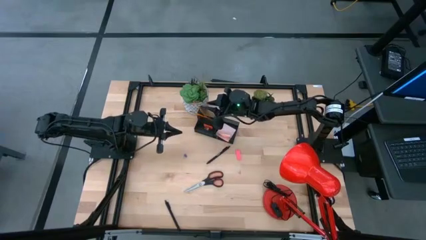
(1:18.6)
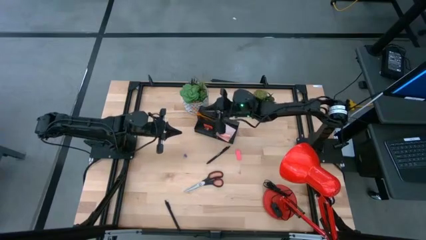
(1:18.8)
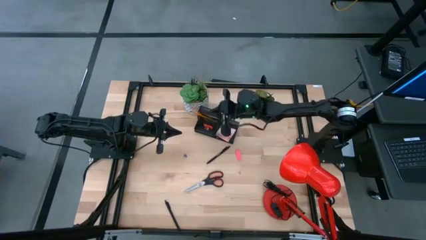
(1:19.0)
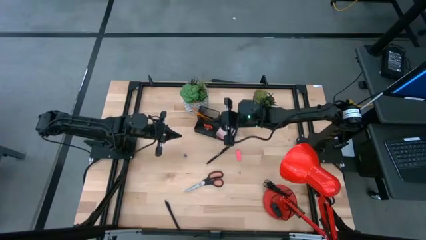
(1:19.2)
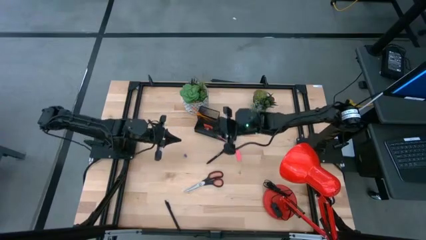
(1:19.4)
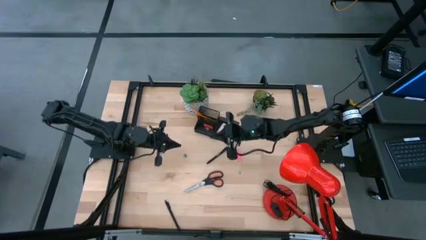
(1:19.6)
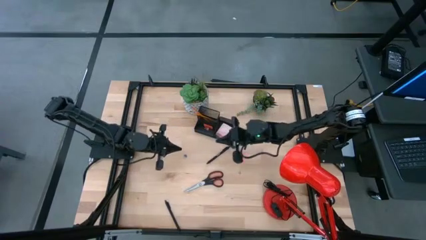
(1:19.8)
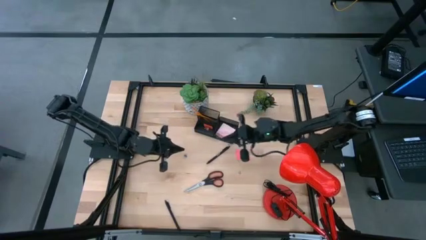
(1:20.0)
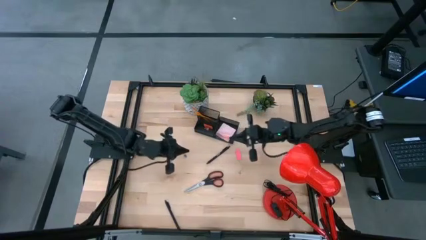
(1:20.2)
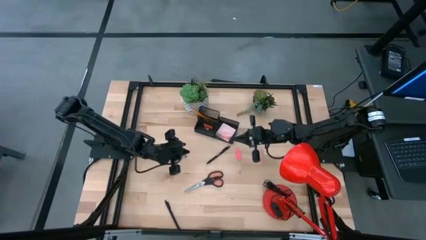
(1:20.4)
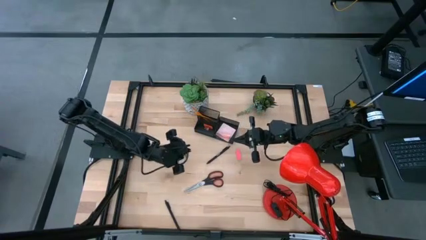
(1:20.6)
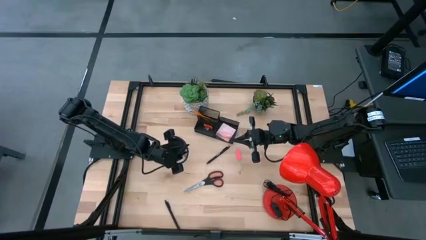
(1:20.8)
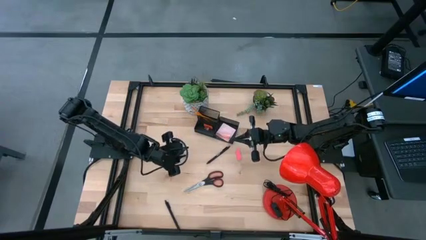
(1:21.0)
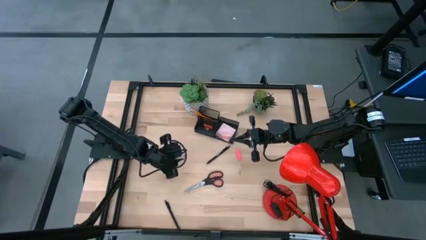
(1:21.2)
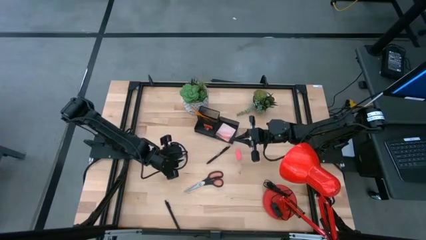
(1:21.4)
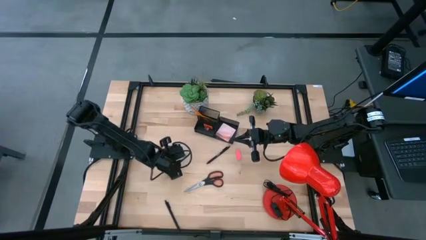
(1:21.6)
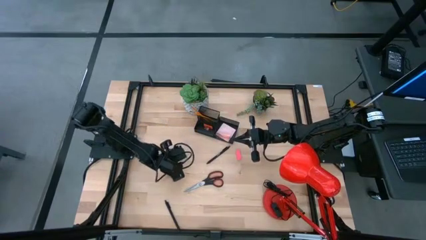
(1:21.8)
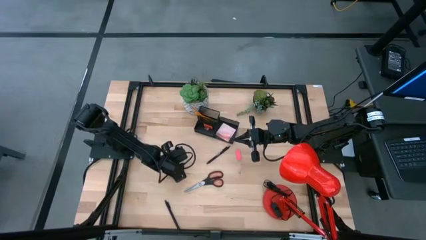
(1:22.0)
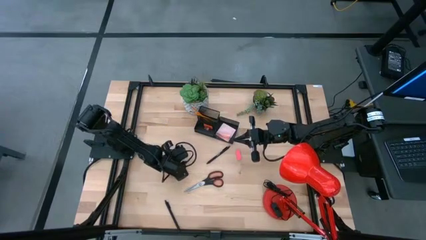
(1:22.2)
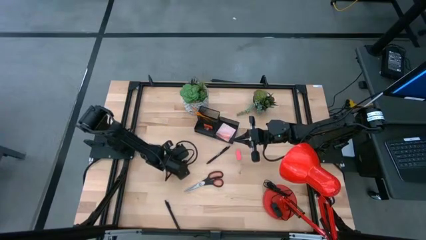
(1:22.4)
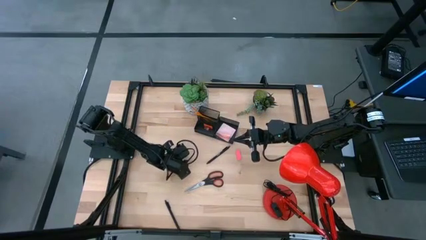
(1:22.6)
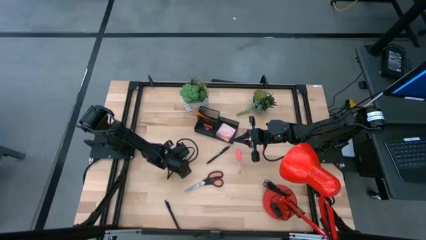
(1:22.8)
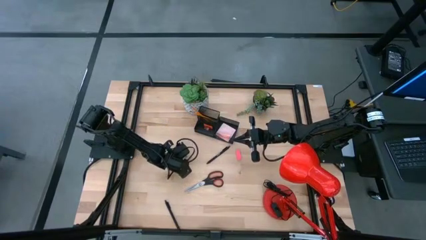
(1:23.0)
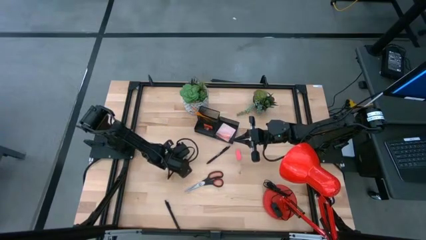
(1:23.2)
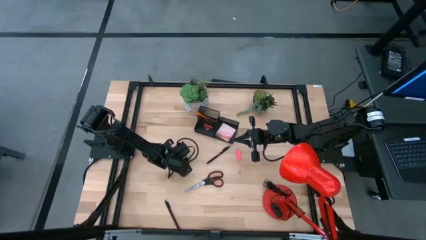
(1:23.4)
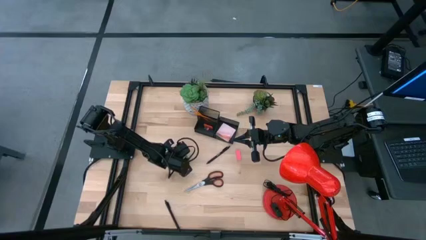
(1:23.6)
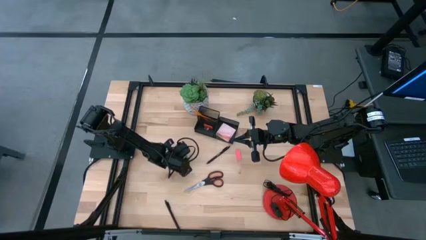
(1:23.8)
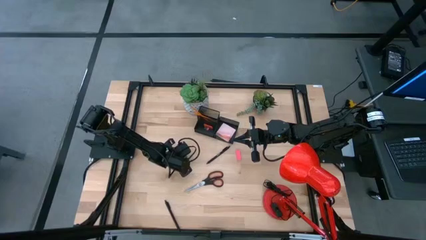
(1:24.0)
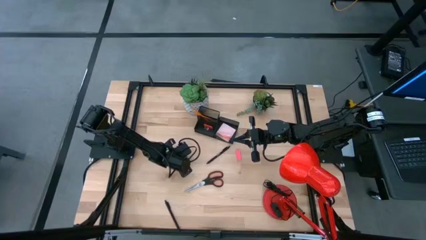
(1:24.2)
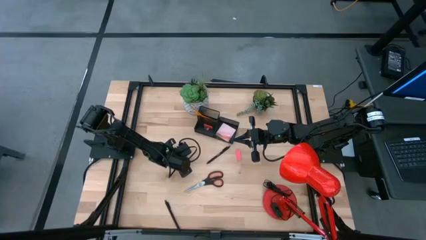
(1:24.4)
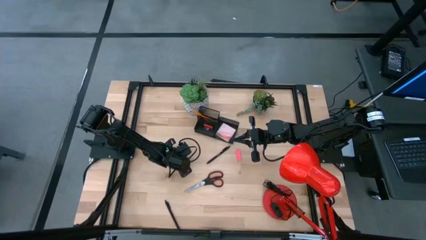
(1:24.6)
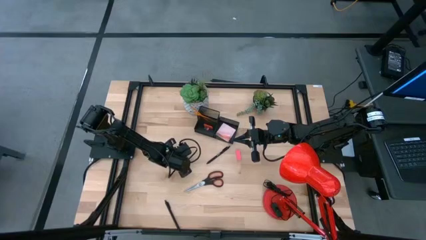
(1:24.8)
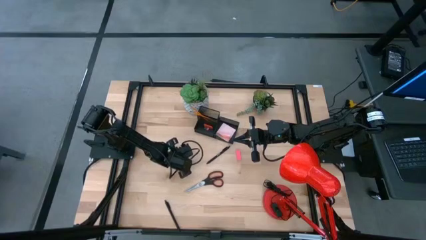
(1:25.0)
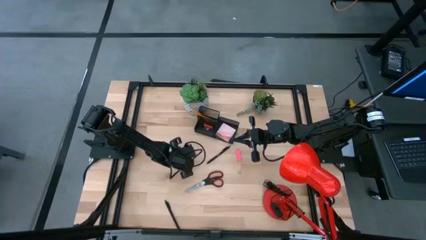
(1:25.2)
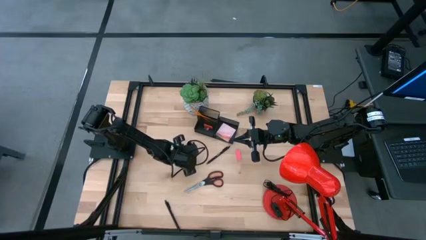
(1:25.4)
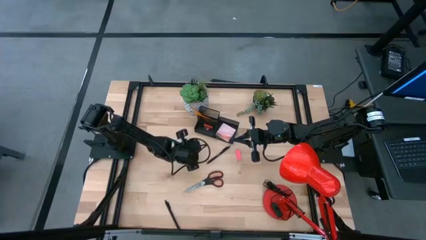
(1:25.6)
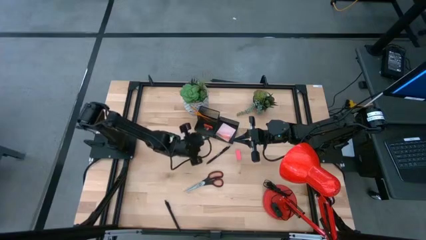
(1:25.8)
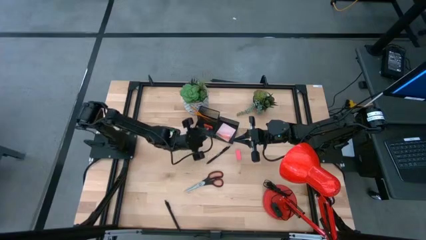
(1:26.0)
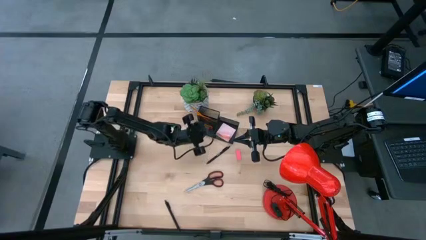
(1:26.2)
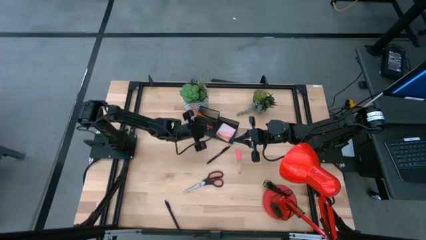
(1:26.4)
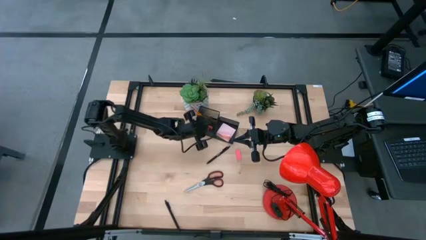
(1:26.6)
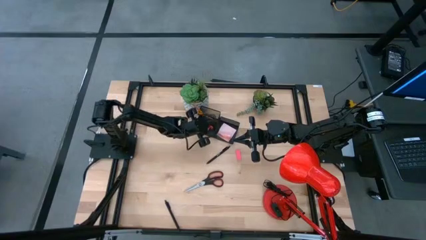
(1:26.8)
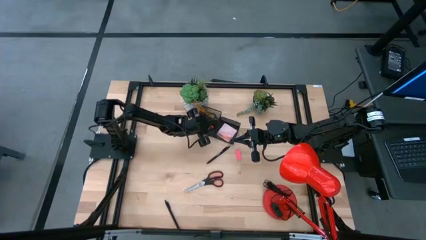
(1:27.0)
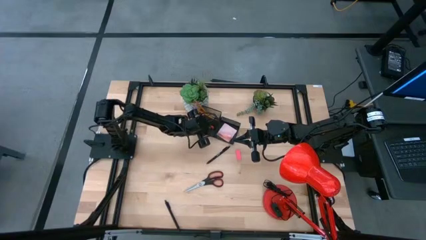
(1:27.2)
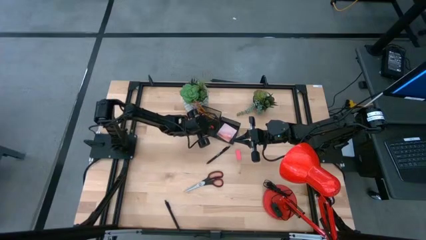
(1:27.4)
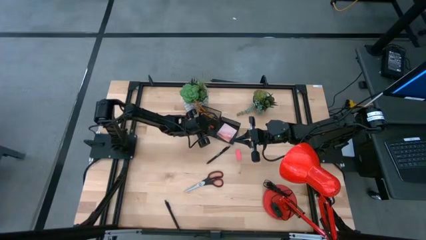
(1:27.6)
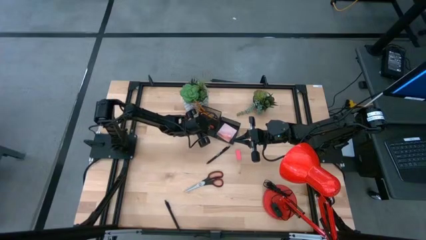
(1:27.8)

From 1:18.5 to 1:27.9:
Task: Pick and place office supplies into organizer
Put the blue binder clip into the black desk organizer

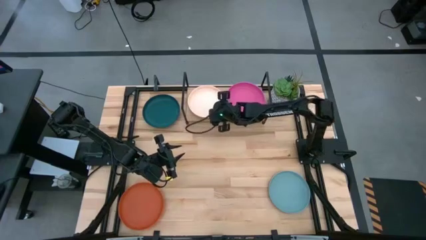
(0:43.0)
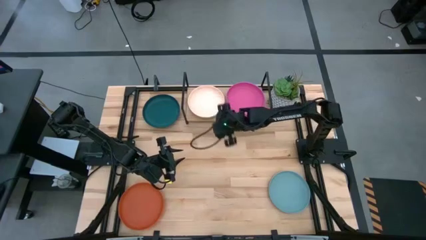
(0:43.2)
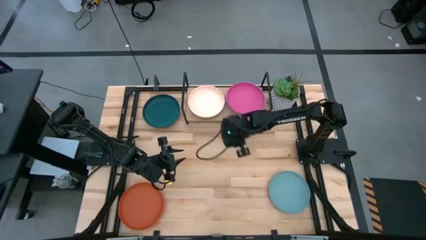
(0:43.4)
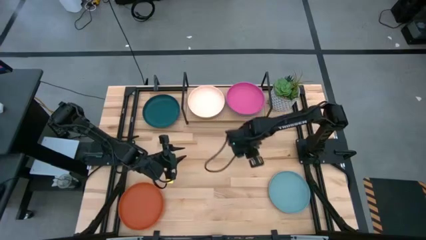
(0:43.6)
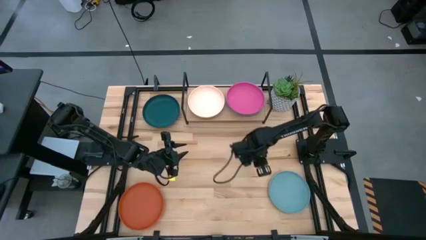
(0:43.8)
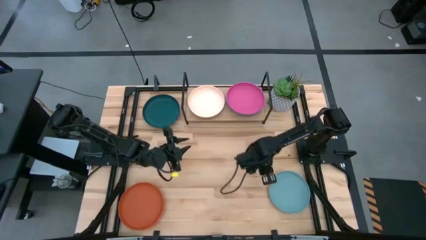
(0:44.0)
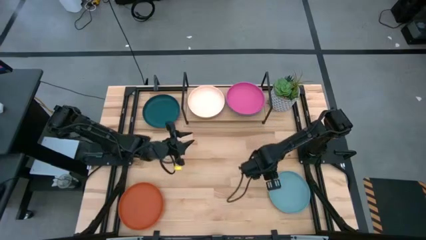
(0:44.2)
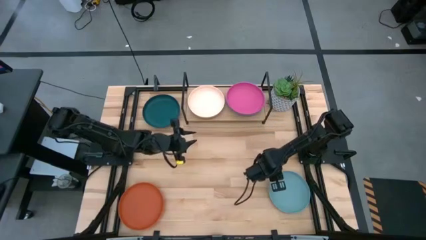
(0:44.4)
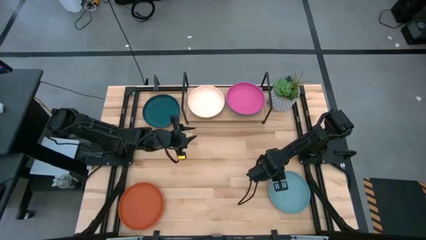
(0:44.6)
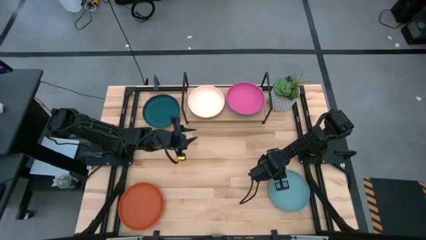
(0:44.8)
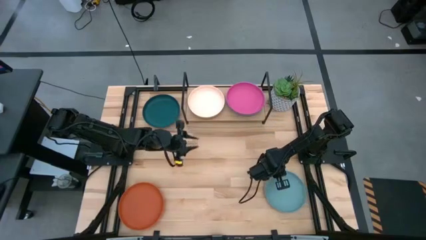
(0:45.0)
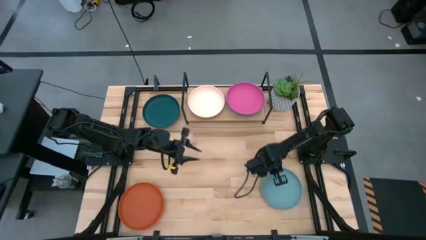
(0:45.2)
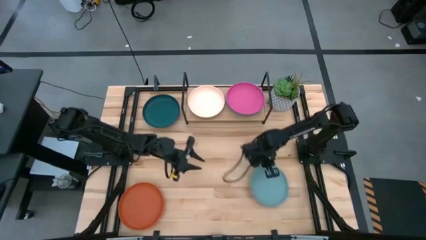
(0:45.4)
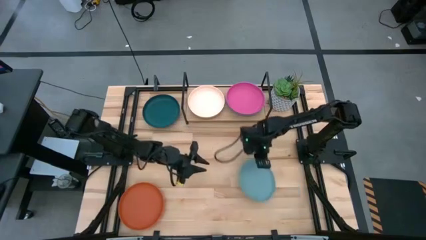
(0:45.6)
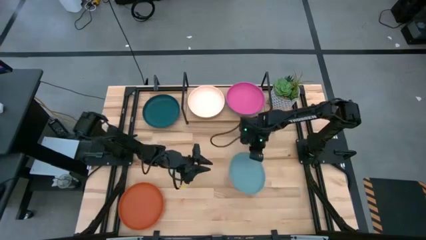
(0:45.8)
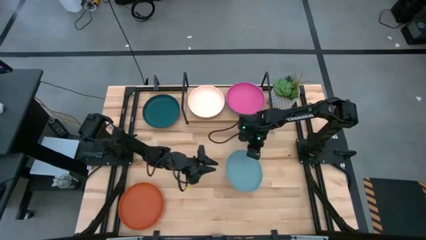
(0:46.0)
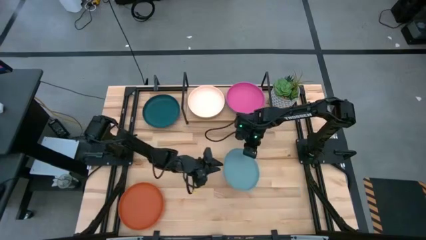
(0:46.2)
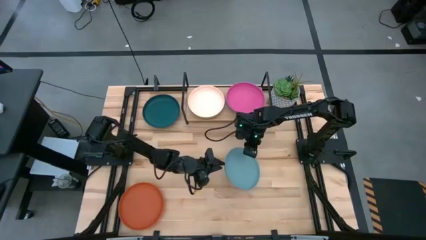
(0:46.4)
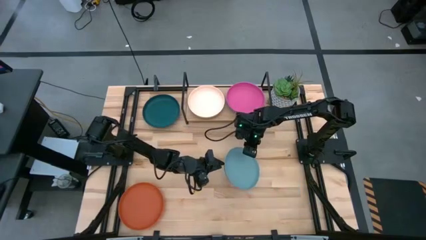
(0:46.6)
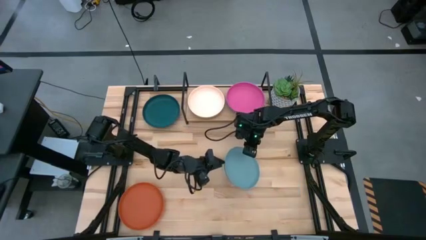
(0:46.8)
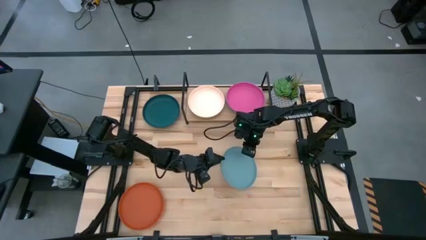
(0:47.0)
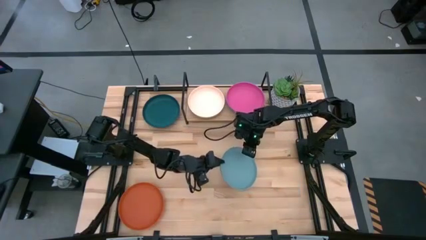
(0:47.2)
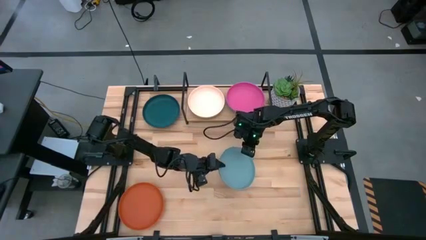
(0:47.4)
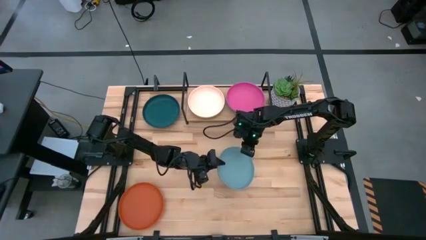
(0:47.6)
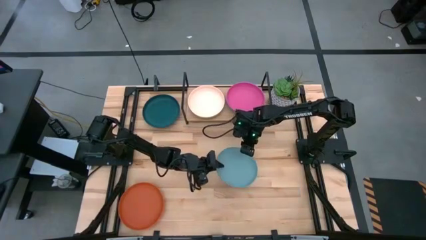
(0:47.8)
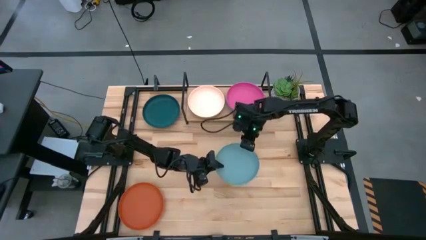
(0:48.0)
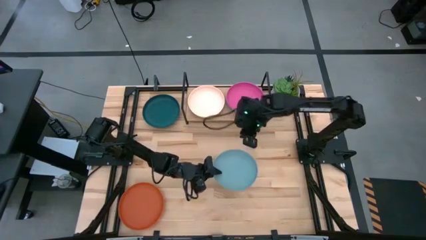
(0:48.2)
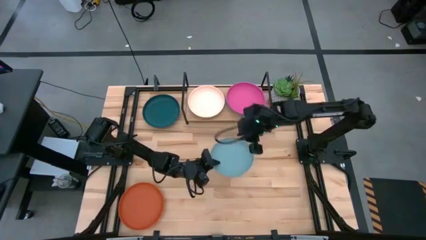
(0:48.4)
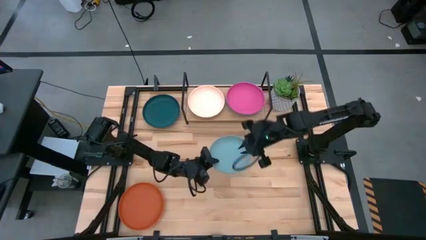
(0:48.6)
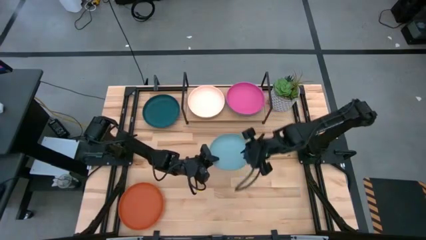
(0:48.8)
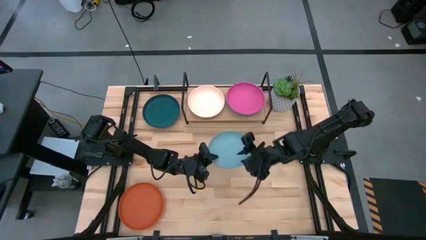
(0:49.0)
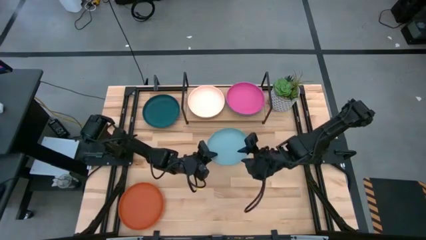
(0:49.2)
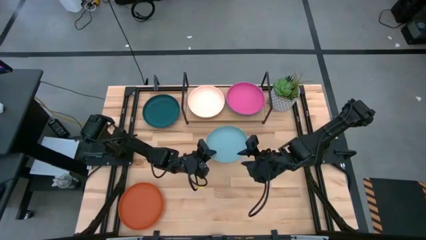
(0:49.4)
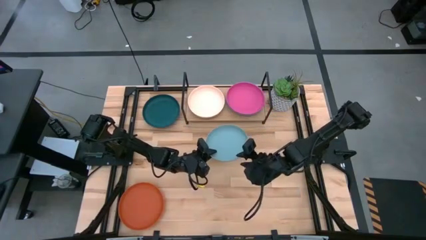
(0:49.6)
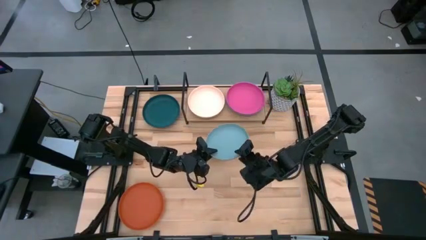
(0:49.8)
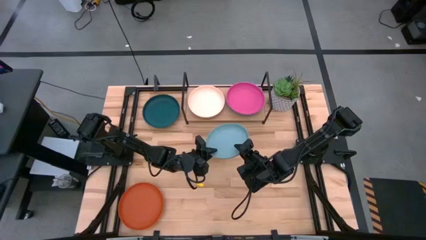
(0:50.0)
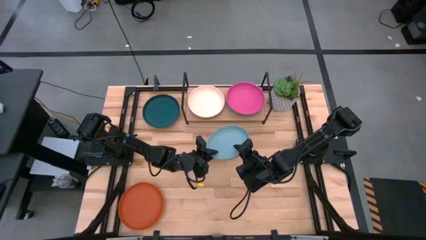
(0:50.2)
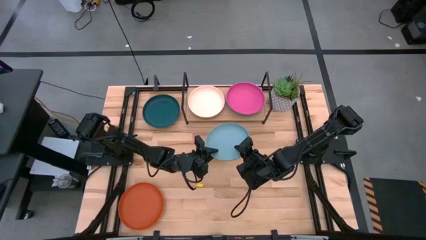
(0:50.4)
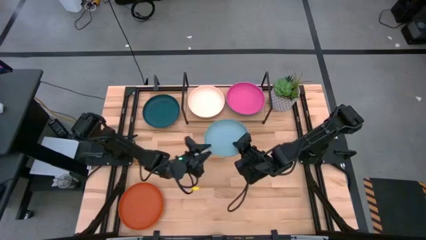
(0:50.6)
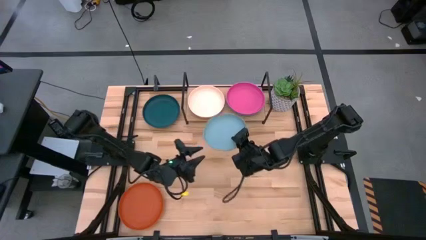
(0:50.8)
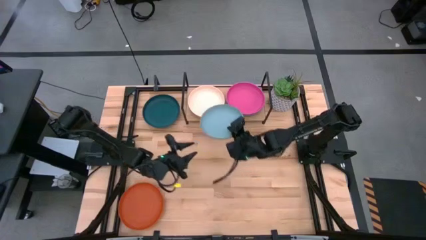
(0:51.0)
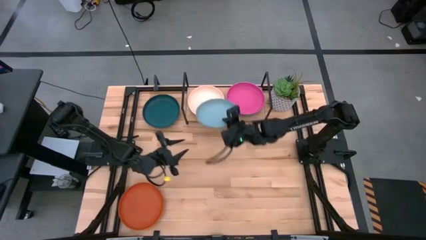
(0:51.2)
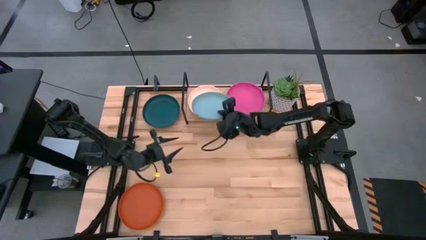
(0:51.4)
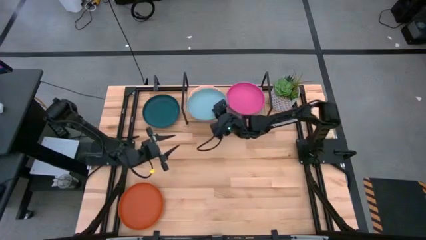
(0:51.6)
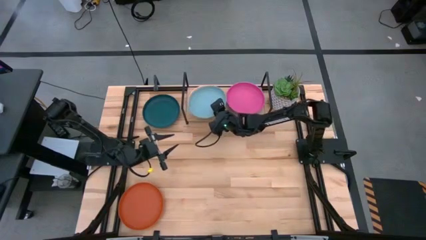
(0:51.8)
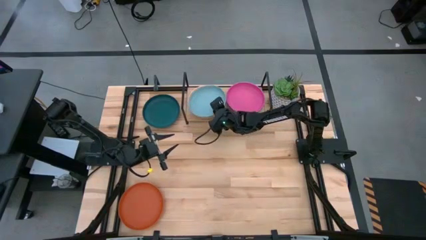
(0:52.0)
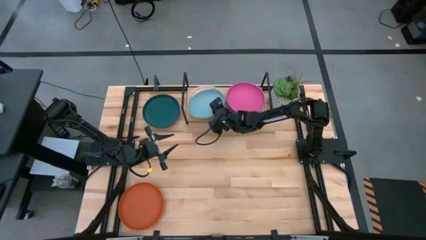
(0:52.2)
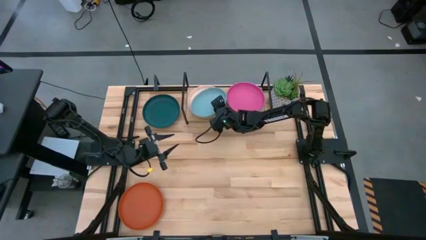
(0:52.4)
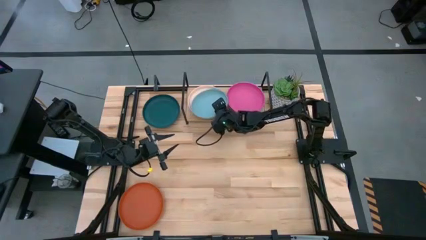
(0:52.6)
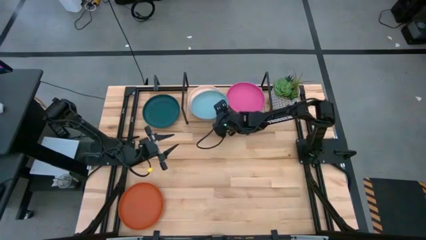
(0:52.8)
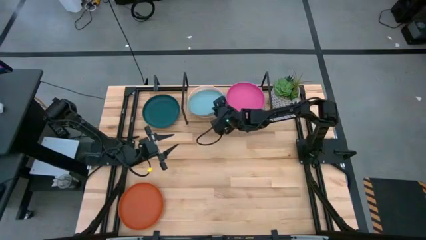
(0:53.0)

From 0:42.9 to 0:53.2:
Task: Place and stack plates onto a shelf
Stack the light blue plate on top of the light orange plate on the shelf
